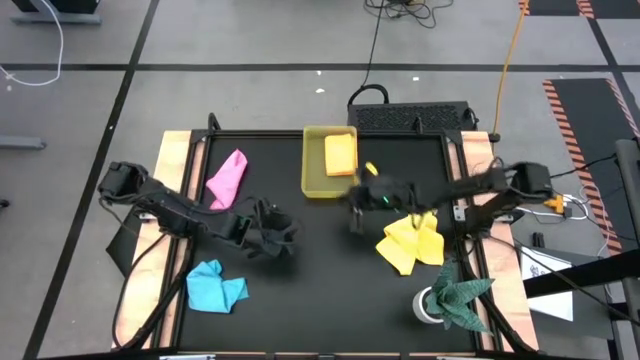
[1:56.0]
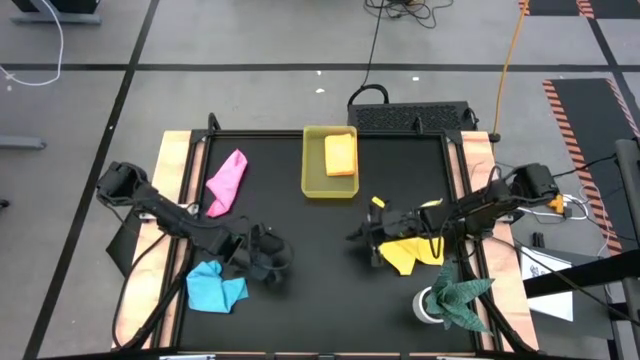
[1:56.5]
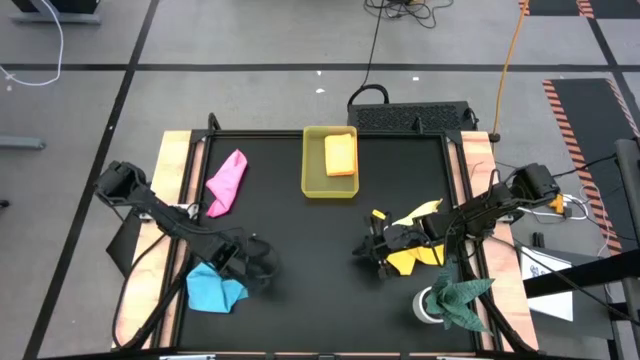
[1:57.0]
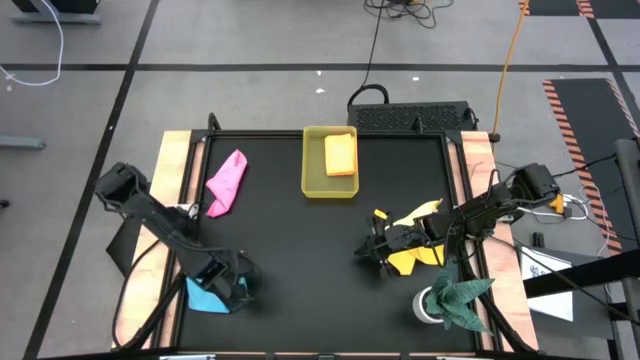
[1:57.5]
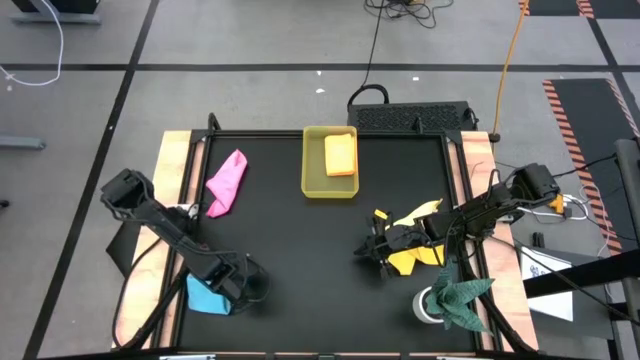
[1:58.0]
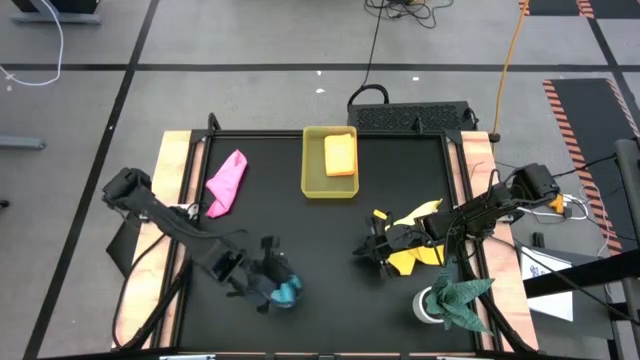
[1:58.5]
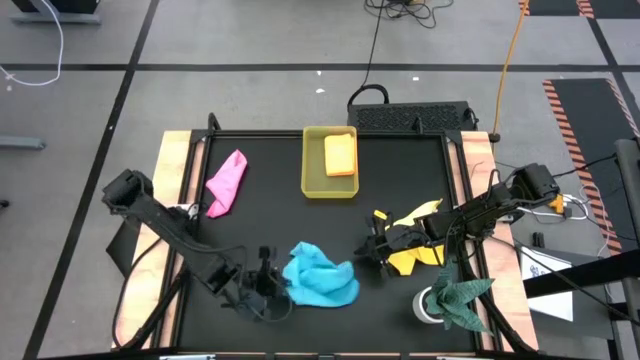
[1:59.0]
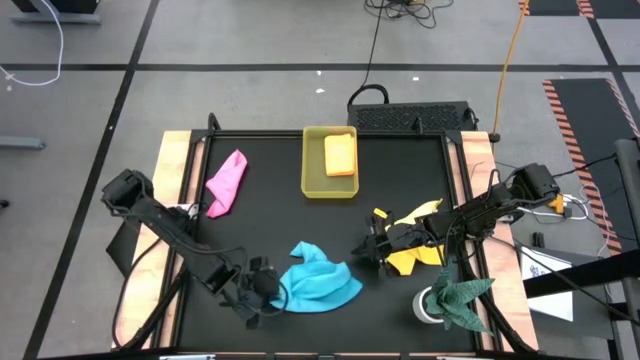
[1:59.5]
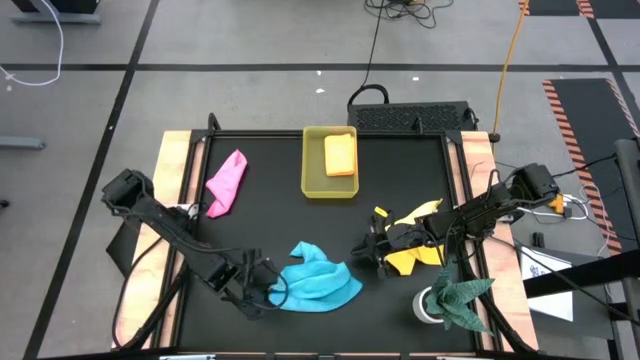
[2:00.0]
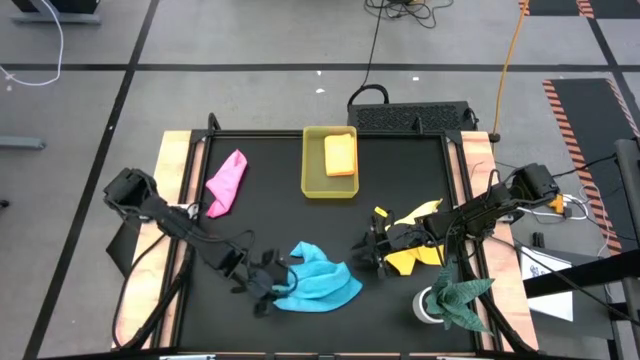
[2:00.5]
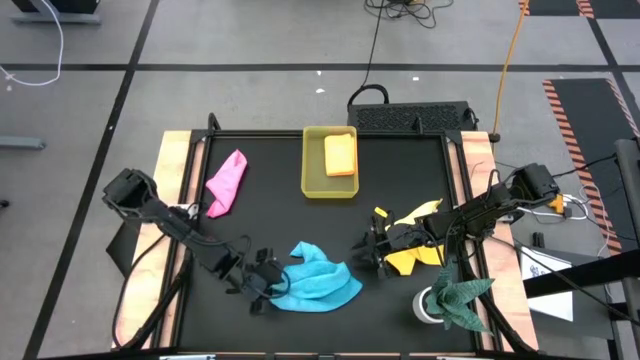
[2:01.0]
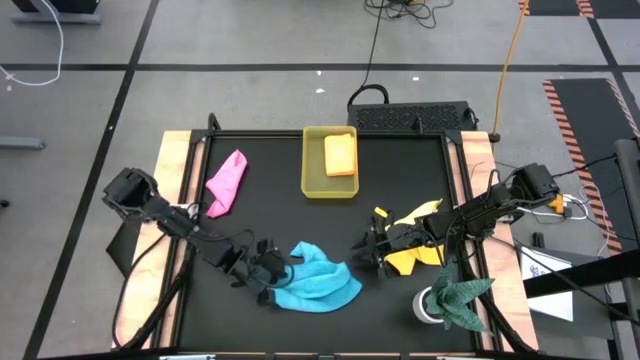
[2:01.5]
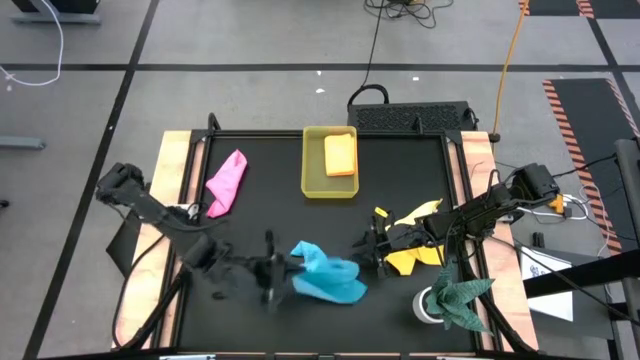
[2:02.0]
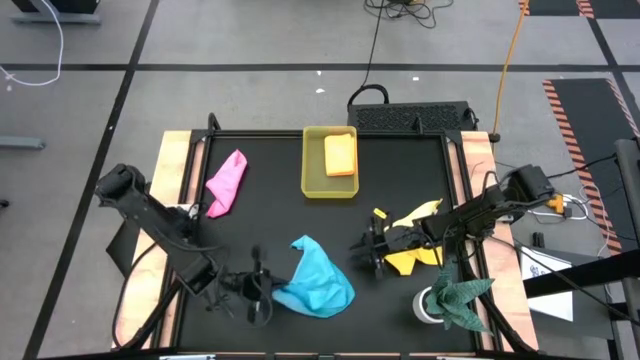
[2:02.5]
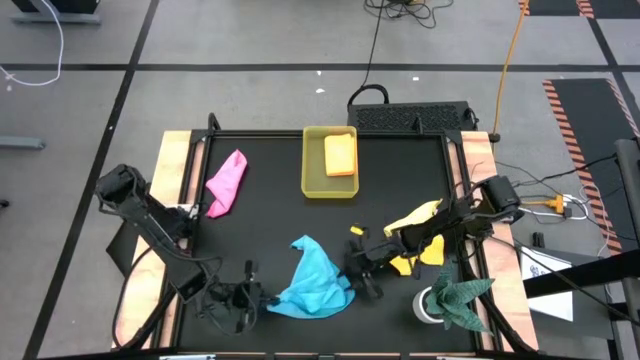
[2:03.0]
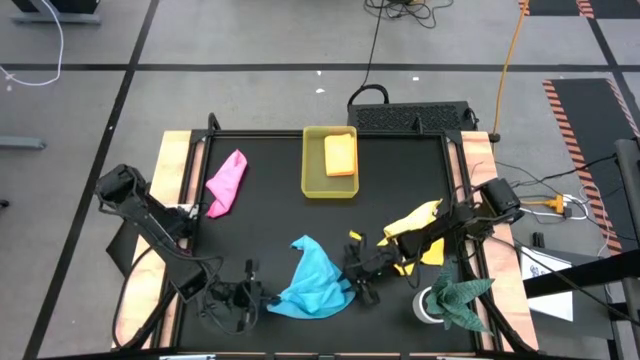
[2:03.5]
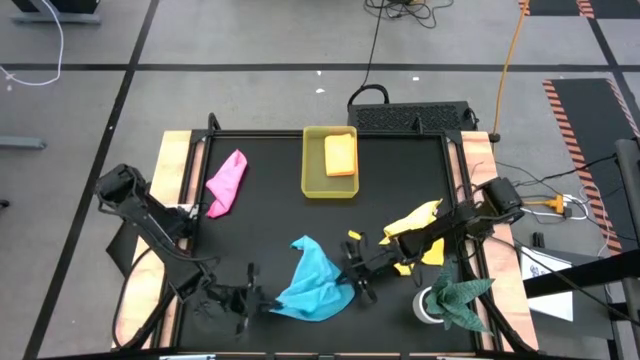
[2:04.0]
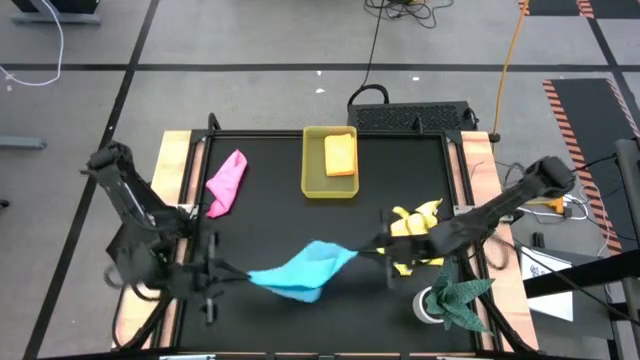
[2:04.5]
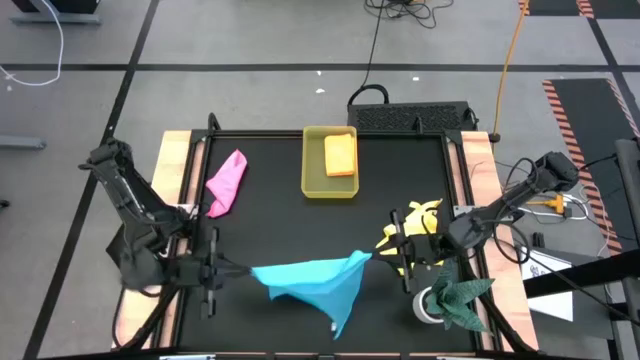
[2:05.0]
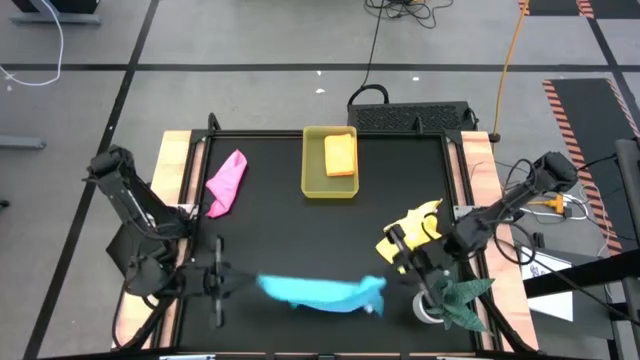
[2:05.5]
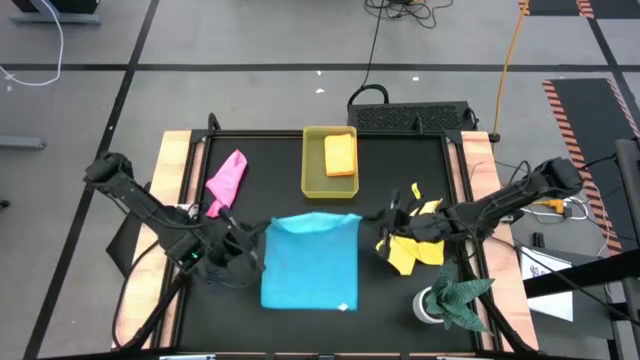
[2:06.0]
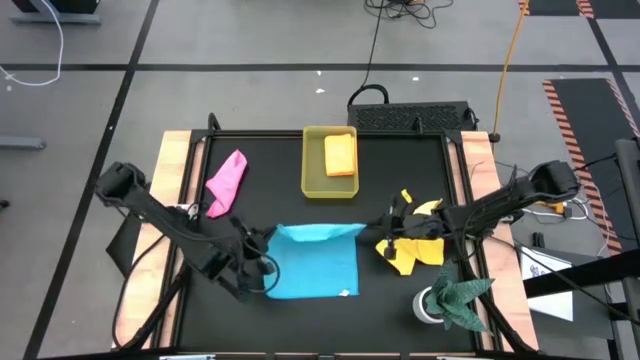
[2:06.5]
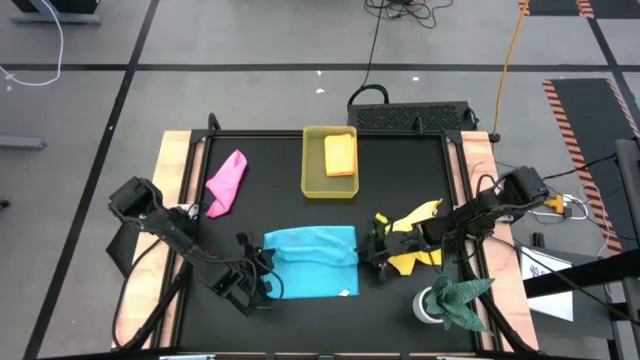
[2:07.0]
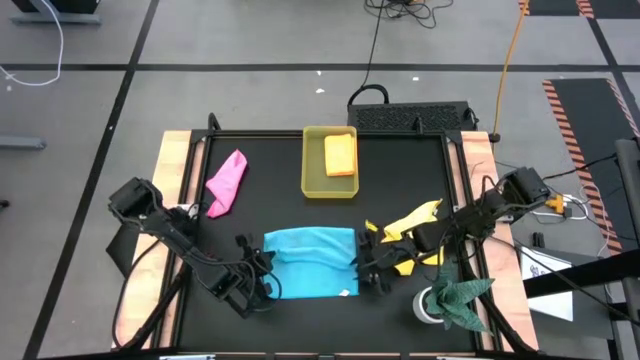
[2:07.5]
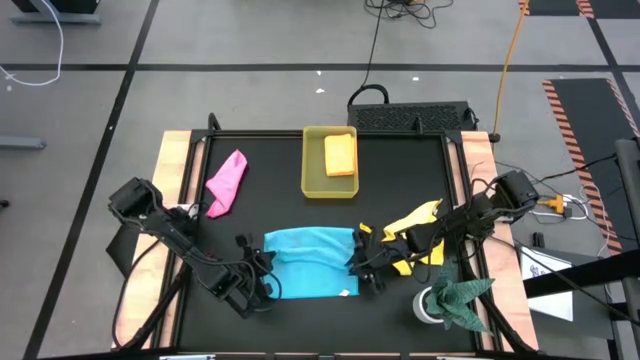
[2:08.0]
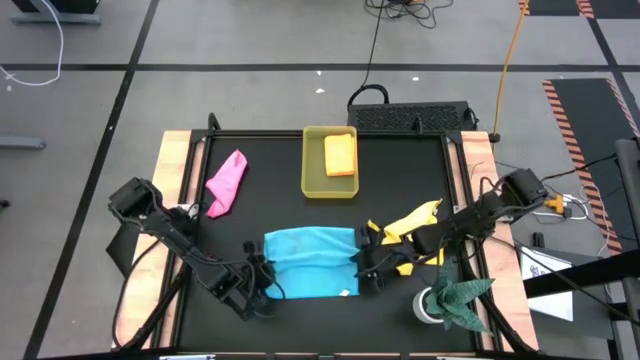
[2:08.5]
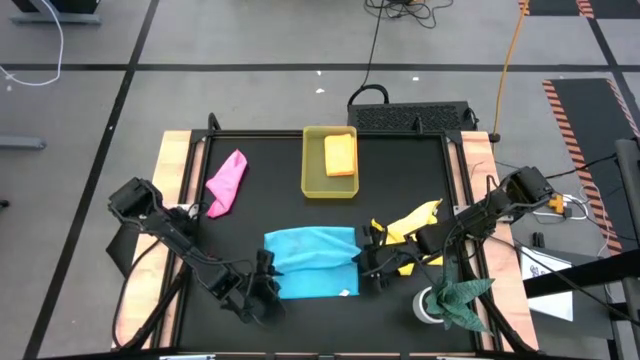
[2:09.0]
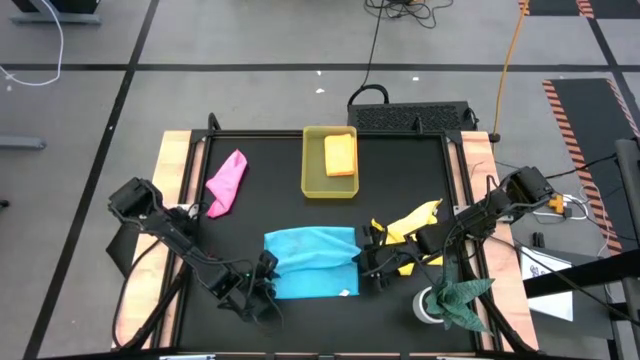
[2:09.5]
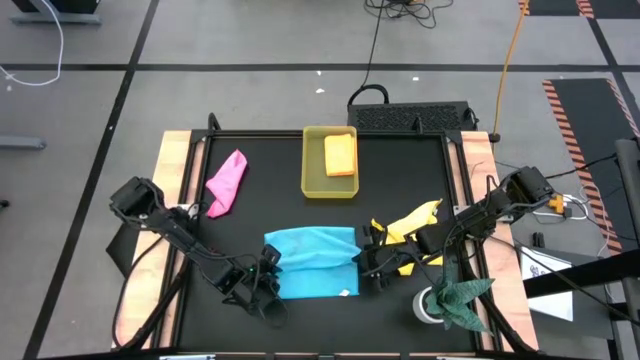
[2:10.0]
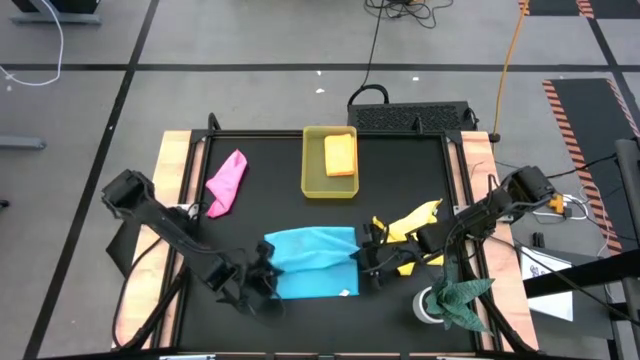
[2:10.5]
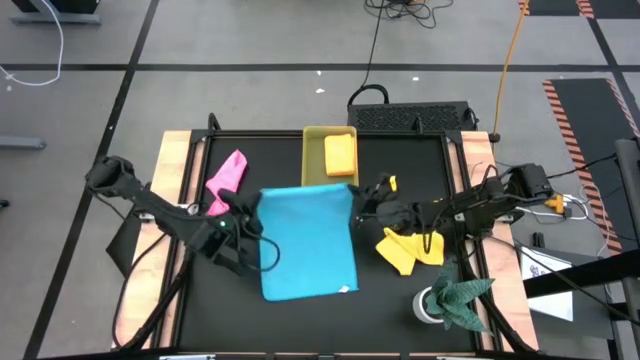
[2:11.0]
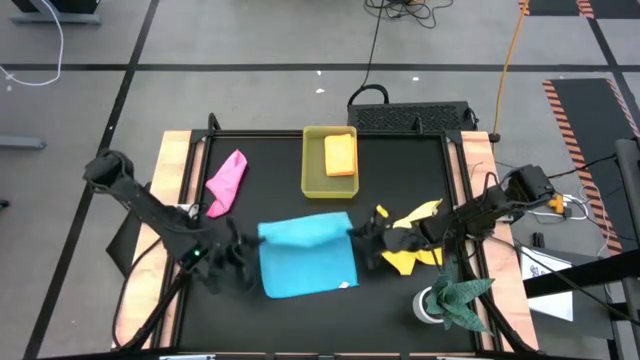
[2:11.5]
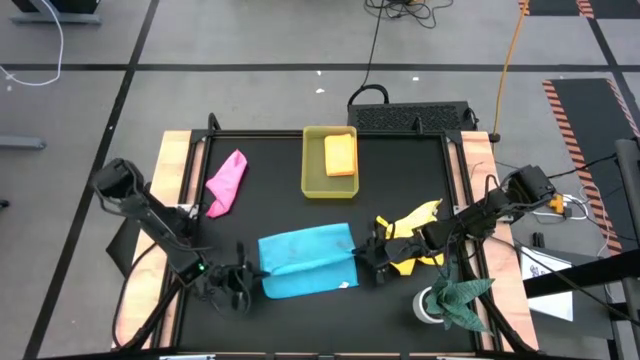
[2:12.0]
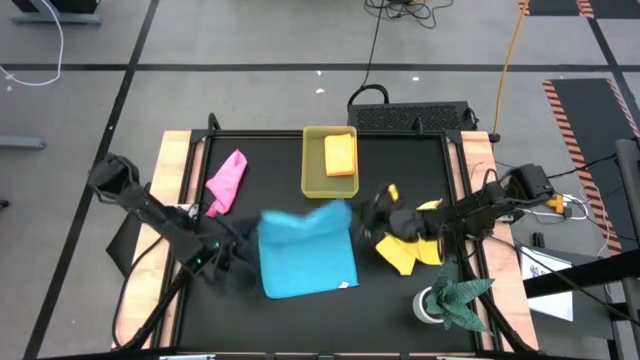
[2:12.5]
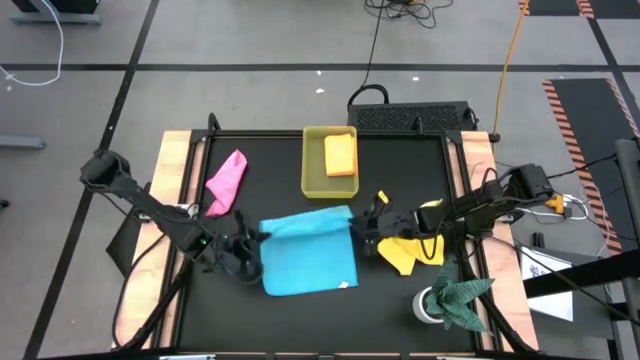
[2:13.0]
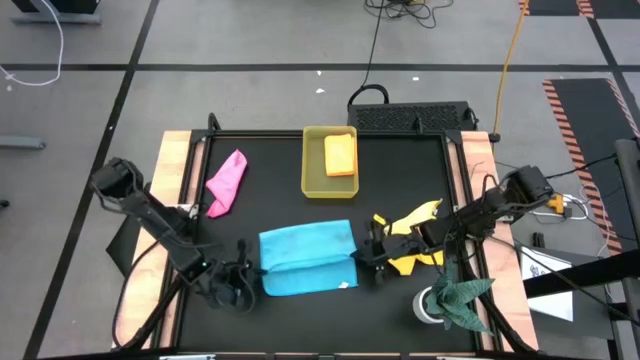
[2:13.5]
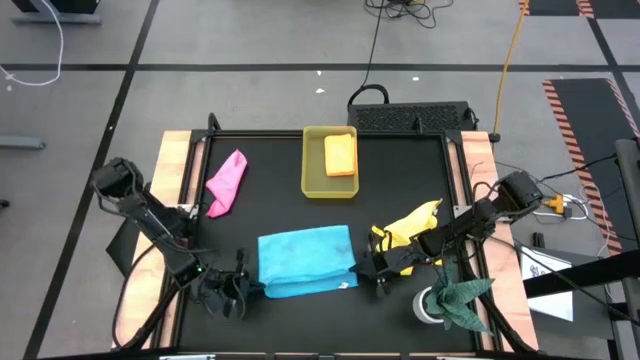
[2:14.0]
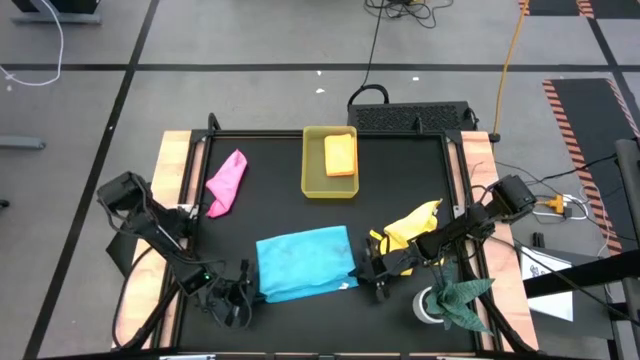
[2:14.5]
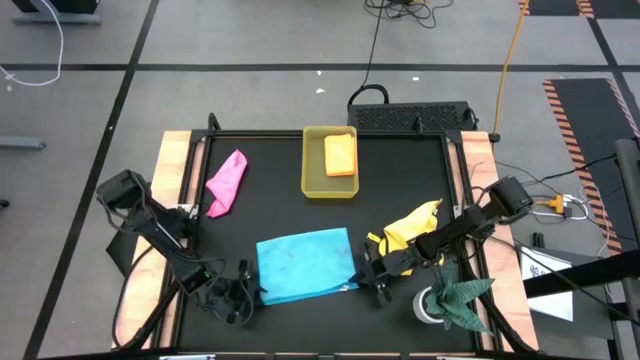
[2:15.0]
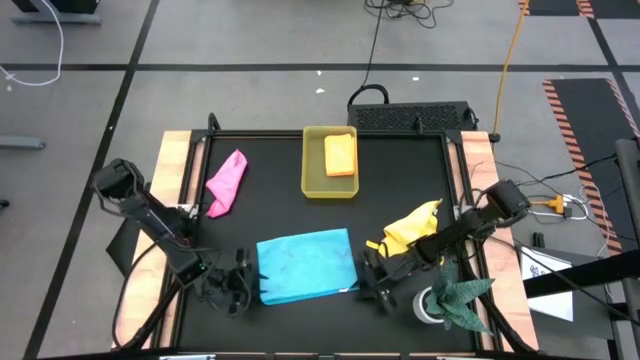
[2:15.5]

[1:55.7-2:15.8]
Task: Fold microfiber towels
Fold the blue towel
